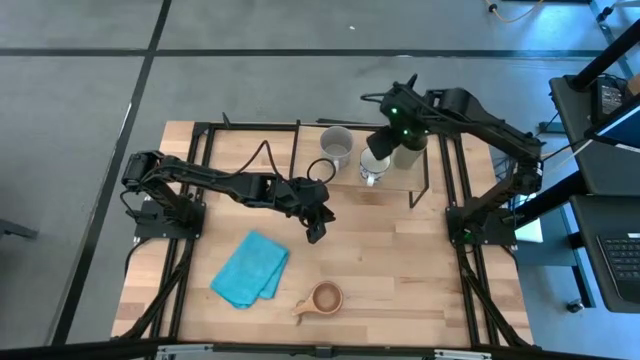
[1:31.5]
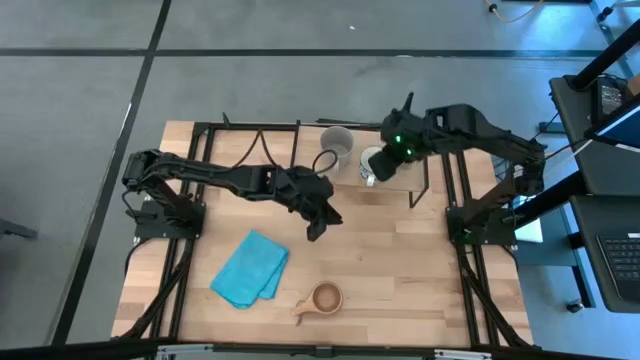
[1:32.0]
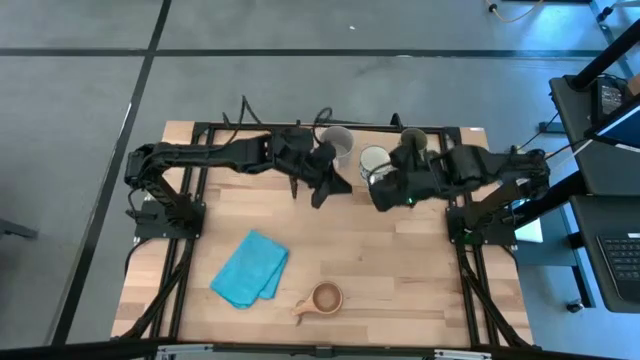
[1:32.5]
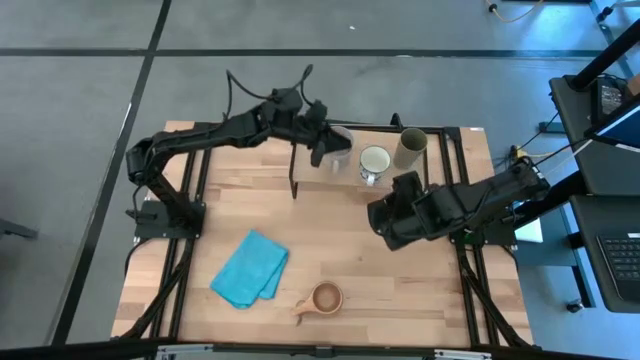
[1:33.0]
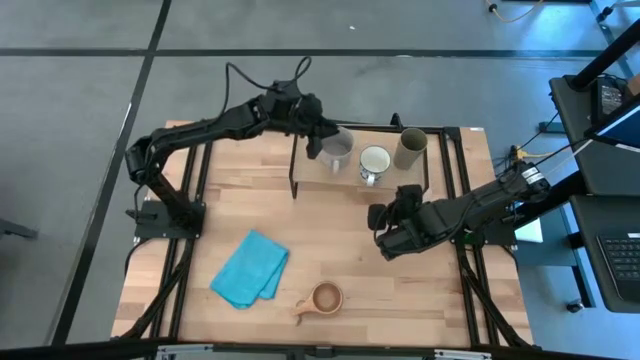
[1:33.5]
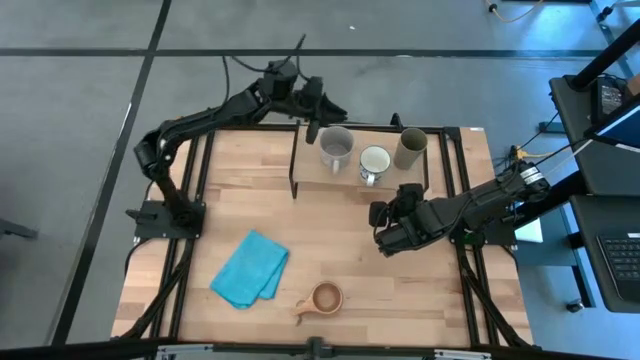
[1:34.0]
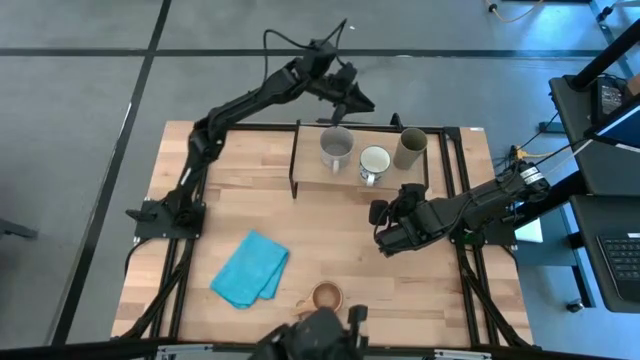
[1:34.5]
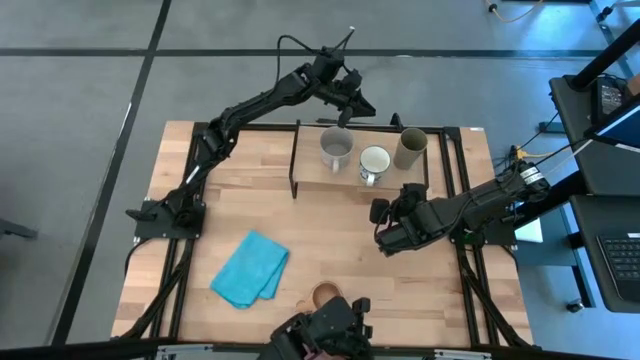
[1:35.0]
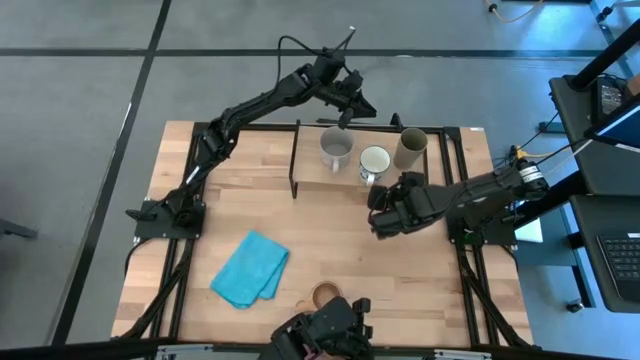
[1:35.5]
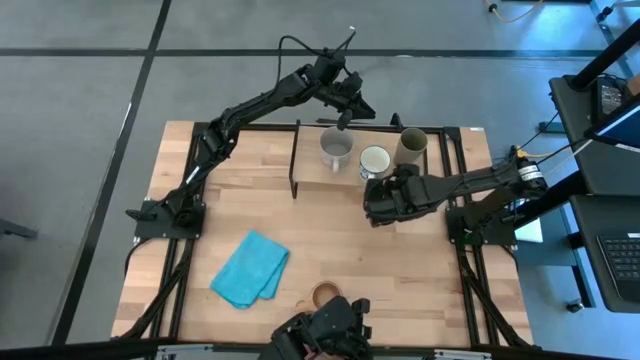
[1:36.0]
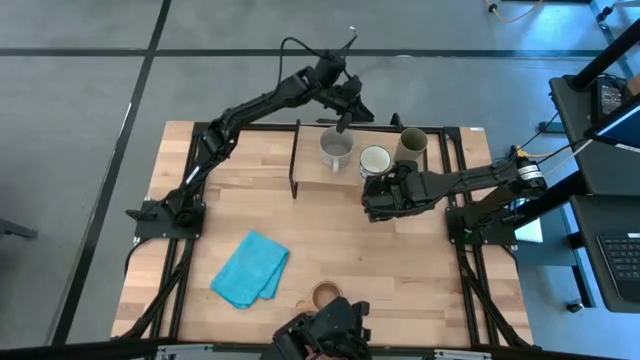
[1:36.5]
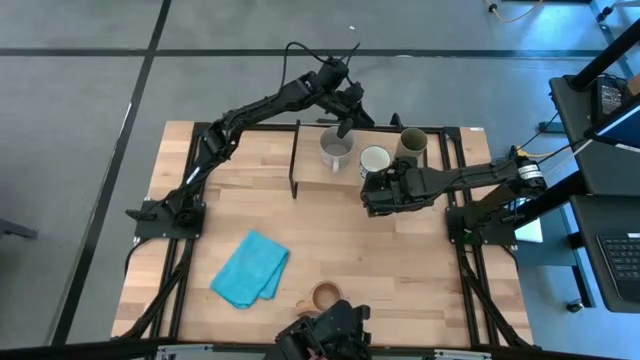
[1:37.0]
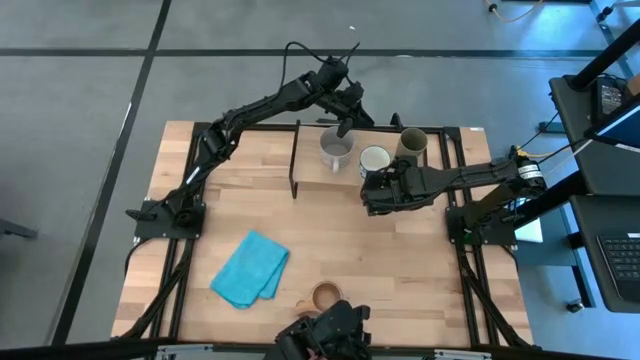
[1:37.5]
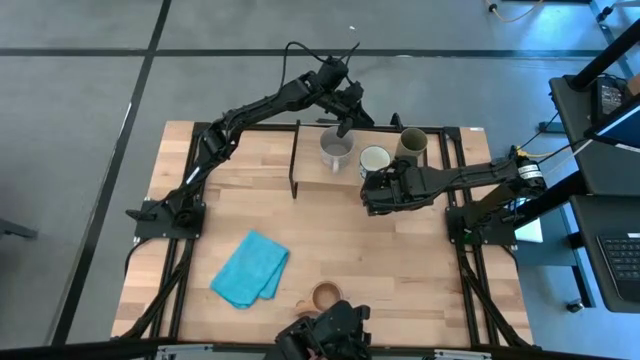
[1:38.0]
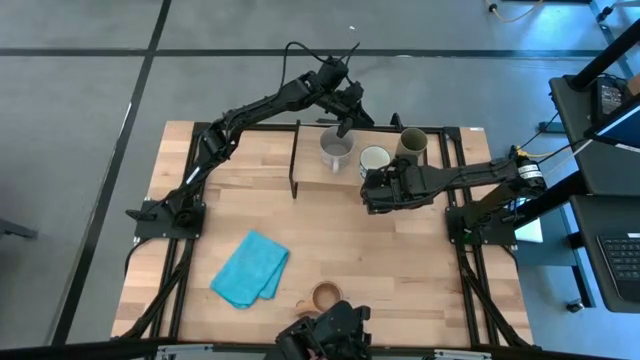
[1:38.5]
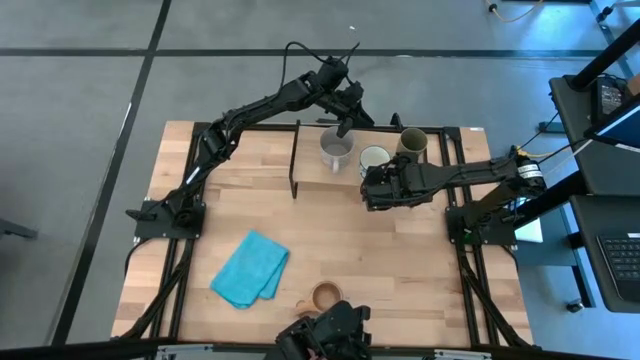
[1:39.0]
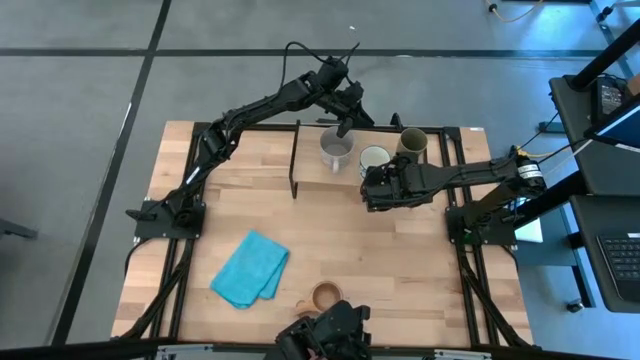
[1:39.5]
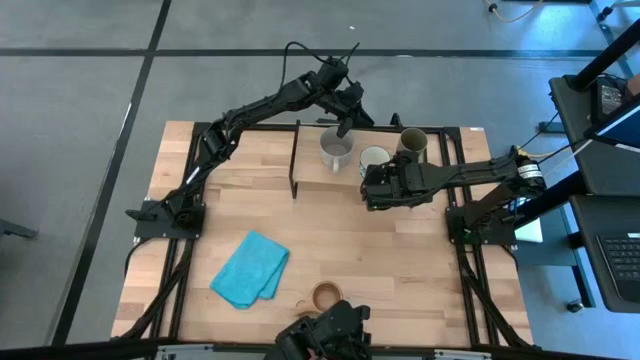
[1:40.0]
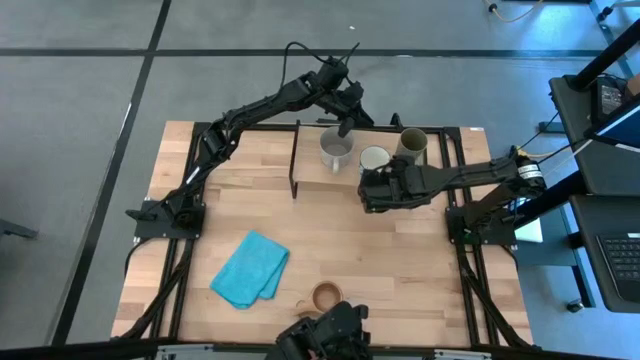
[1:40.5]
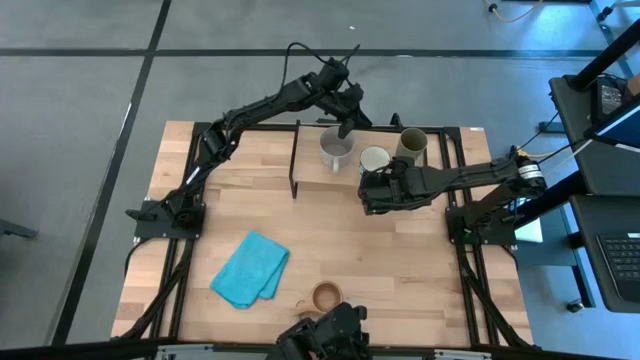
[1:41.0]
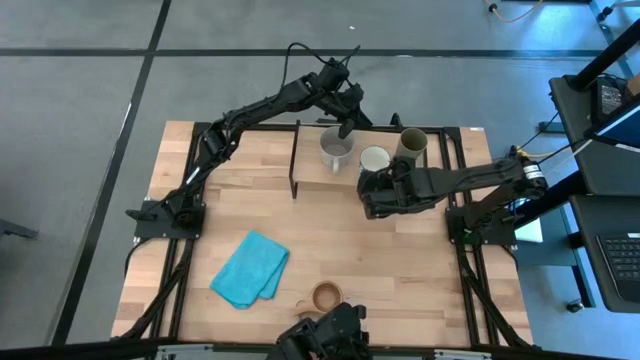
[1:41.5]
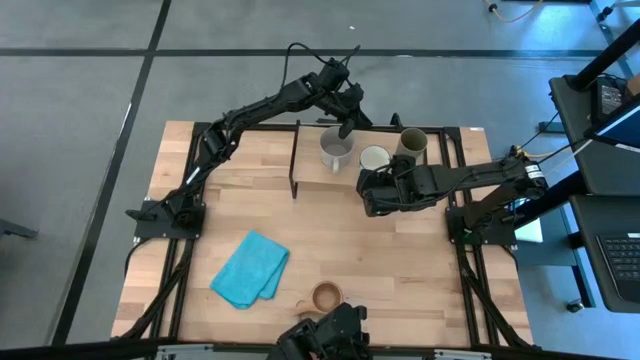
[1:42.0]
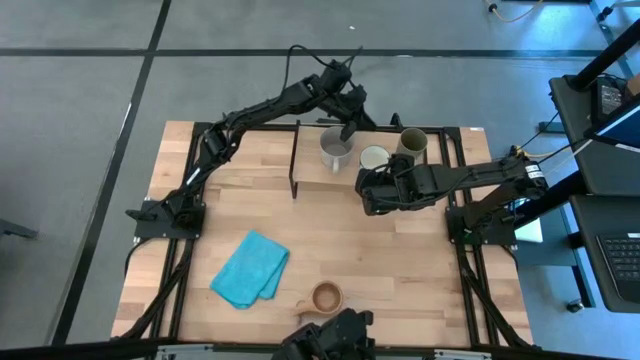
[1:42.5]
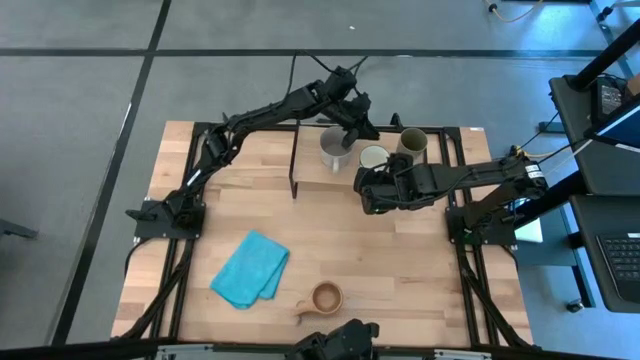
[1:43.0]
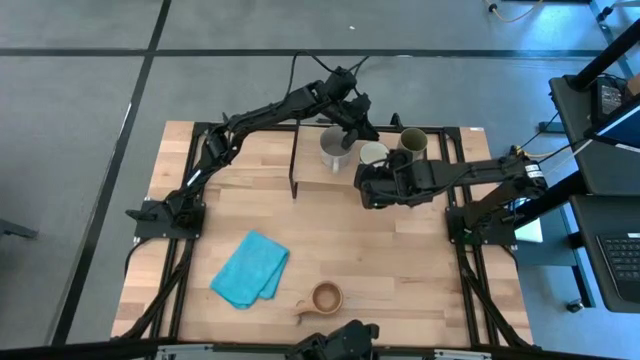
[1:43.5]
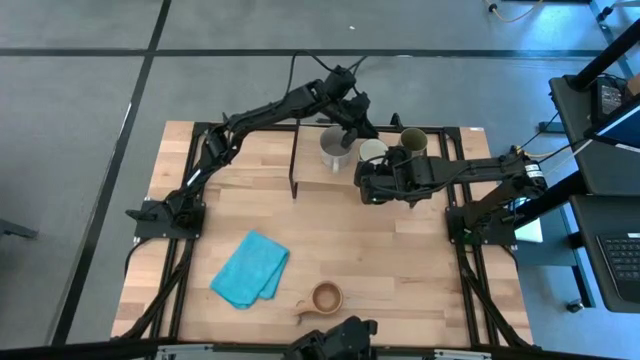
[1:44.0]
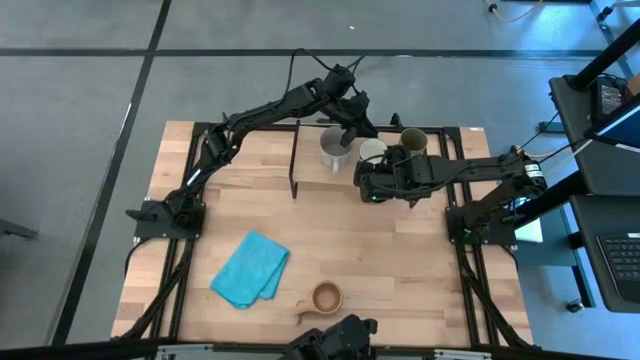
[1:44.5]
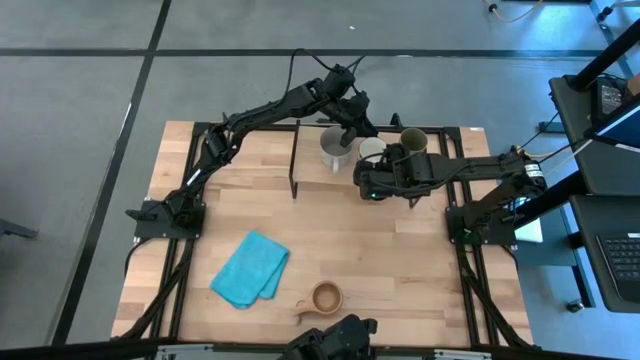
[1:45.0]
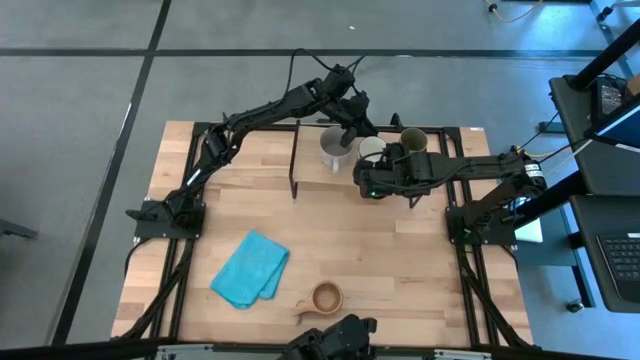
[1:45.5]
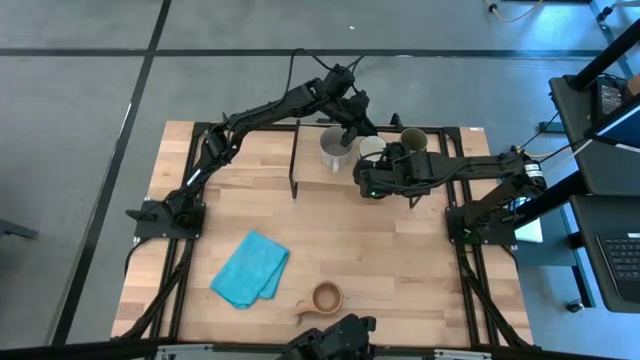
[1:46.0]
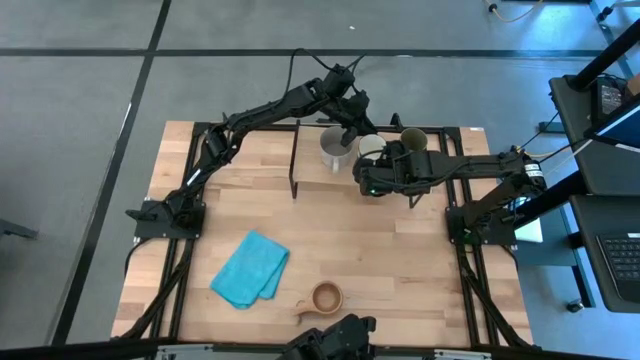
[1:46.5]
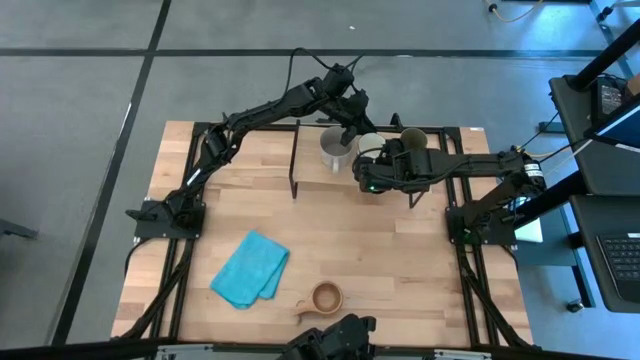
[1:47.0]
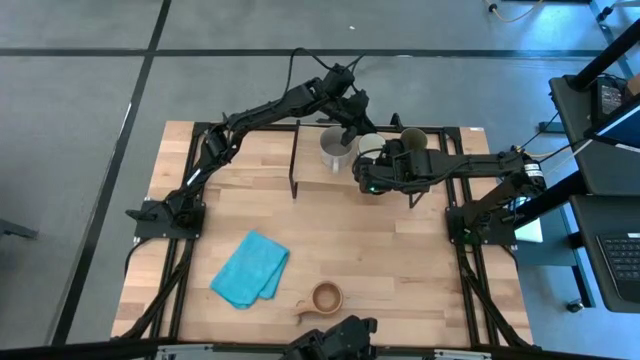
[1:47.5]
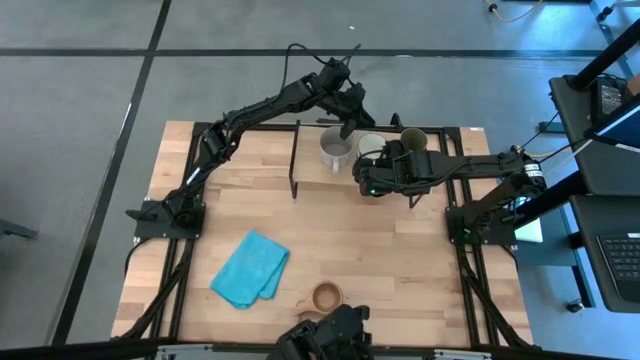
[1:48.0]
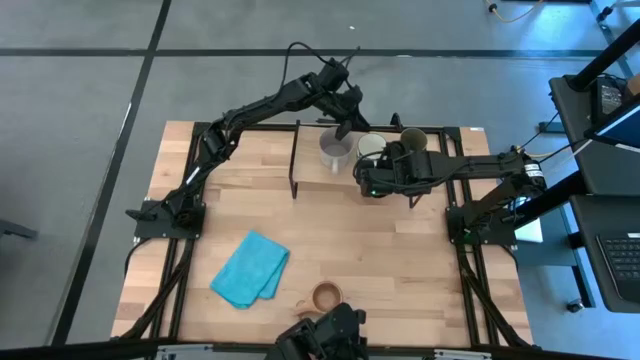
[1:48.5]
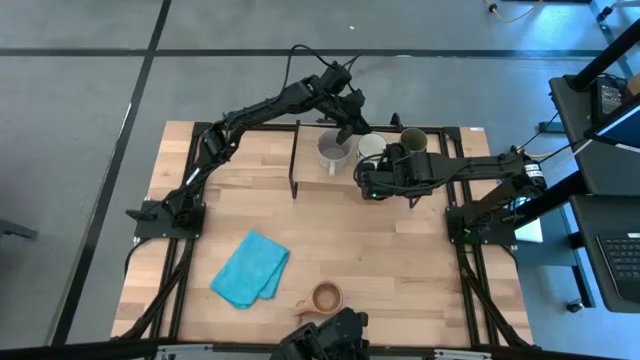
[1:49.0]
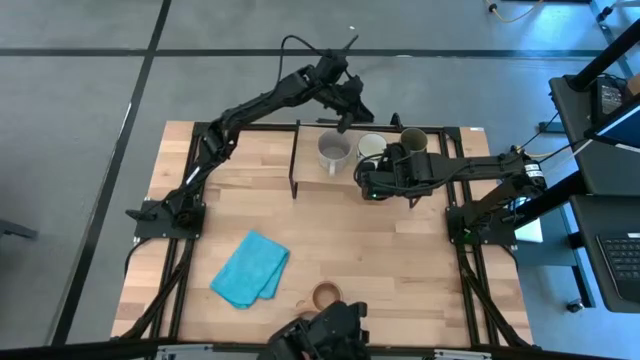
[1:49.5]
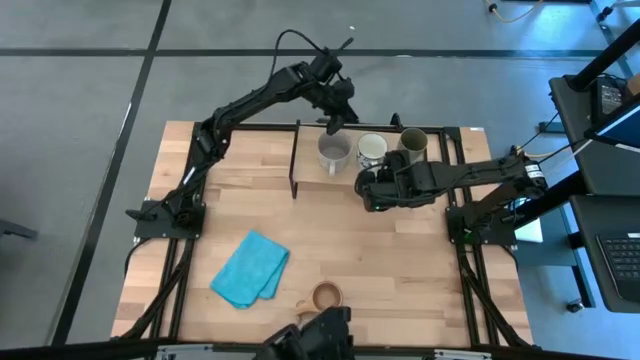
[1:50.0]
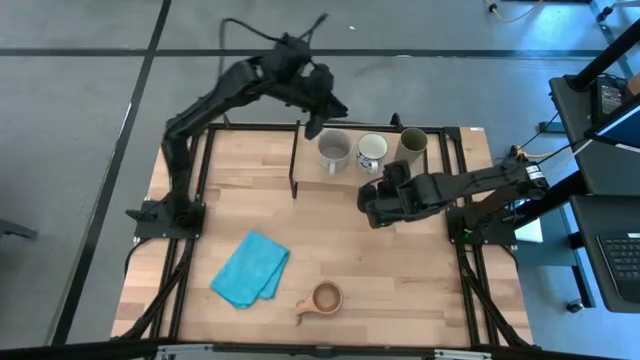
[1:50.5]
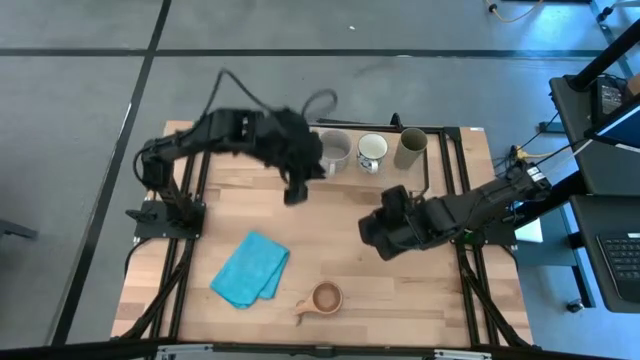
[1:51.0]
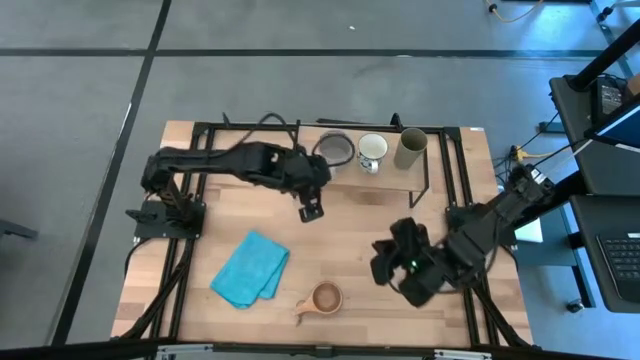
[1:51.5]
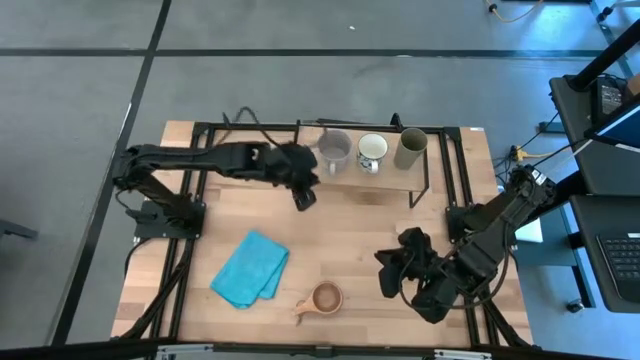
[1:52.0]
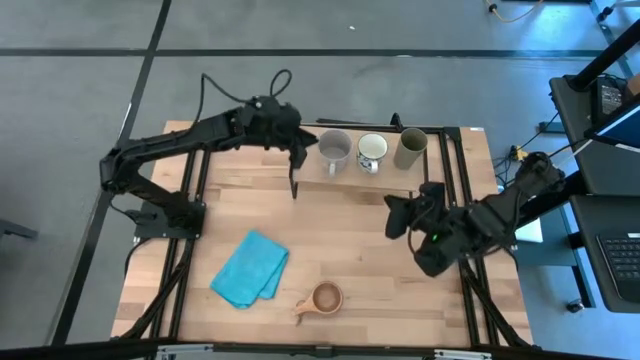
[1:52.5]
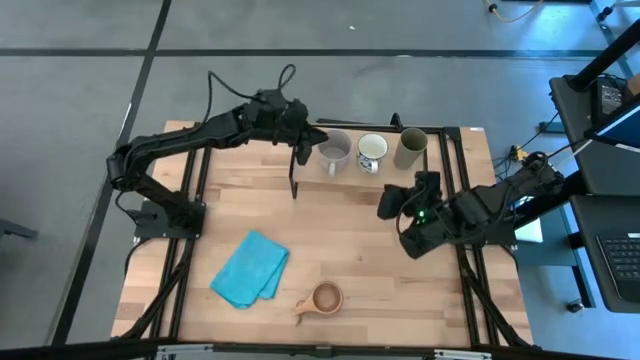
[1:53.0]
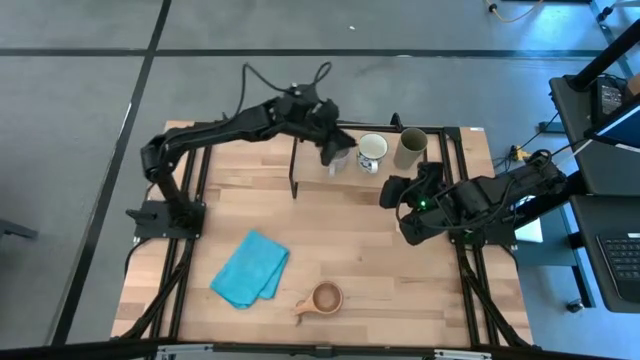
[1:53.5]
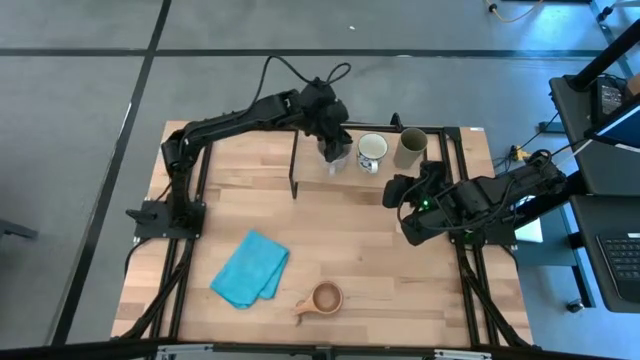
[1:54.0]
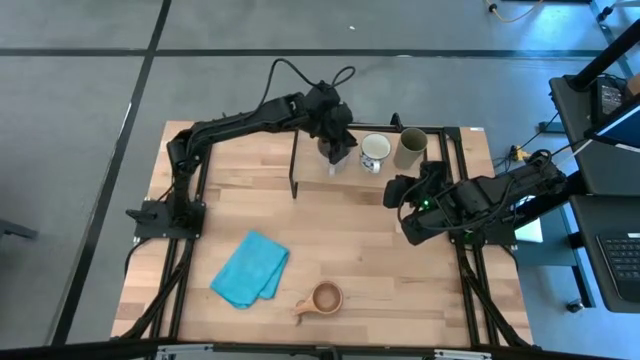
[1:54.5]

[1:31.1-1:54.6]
Task: Stack small to large cups/mugs on shelf
Put the blue mug on the shelf
